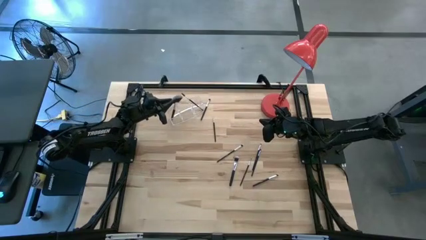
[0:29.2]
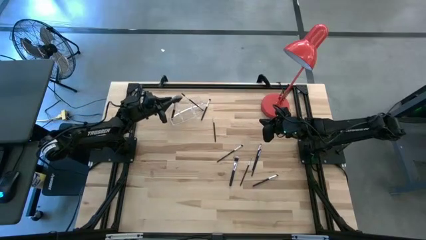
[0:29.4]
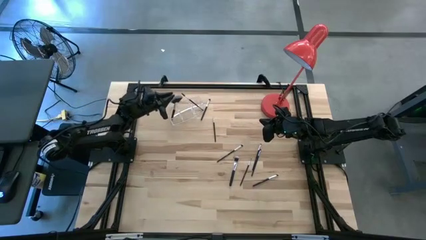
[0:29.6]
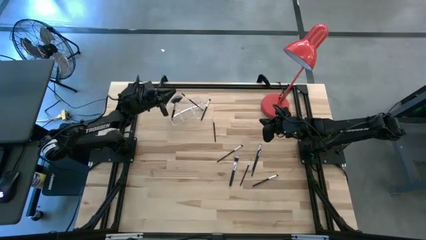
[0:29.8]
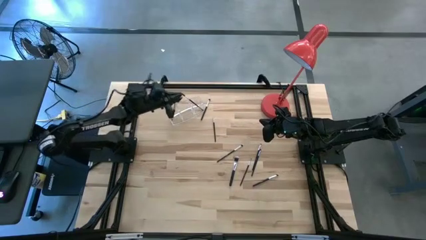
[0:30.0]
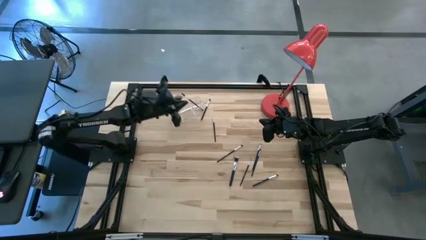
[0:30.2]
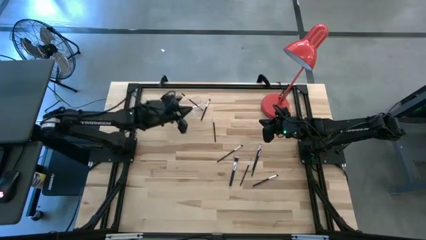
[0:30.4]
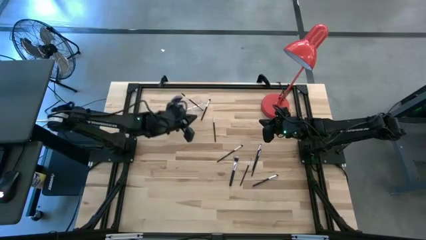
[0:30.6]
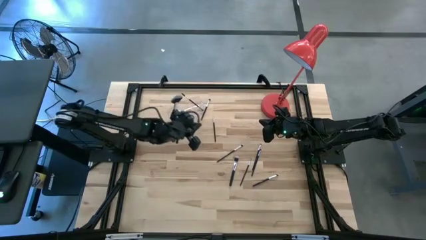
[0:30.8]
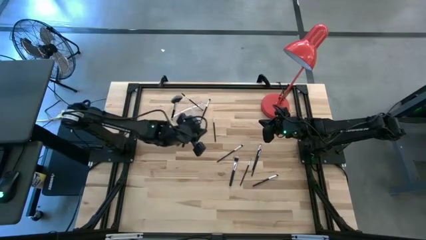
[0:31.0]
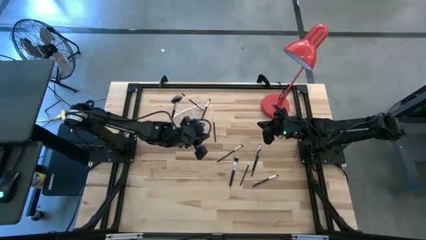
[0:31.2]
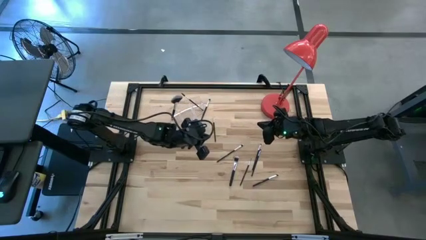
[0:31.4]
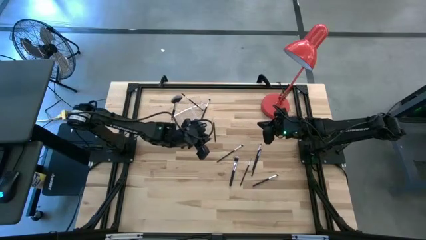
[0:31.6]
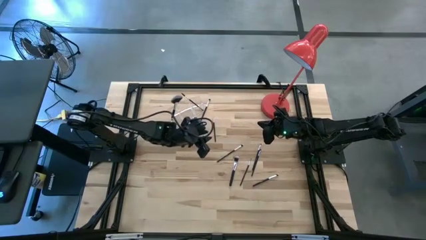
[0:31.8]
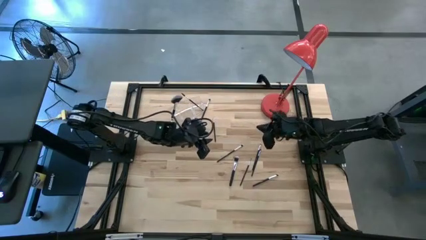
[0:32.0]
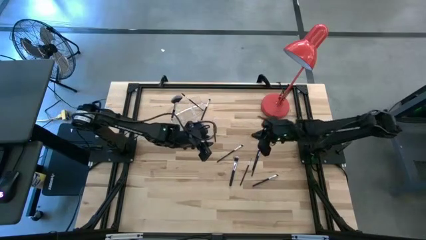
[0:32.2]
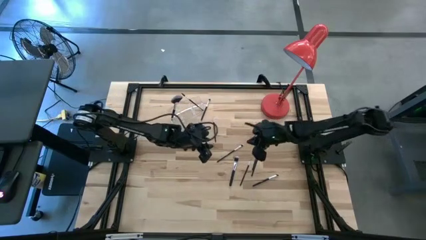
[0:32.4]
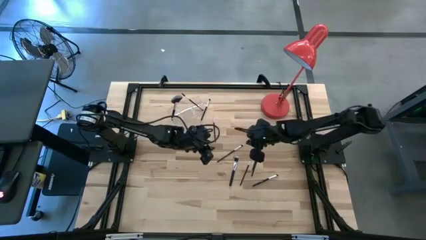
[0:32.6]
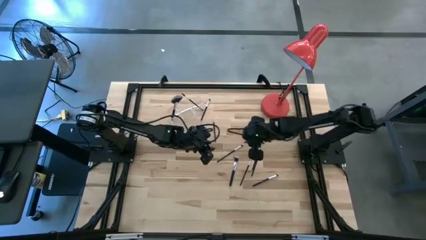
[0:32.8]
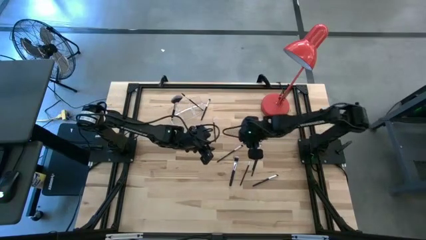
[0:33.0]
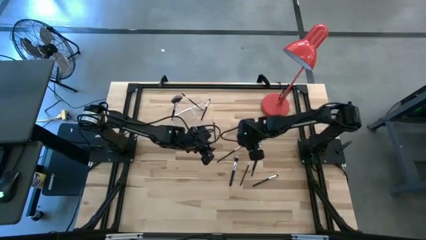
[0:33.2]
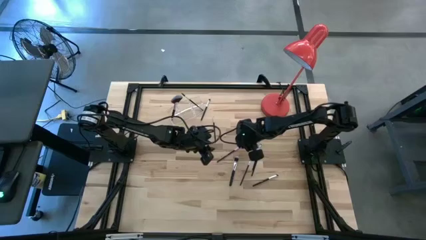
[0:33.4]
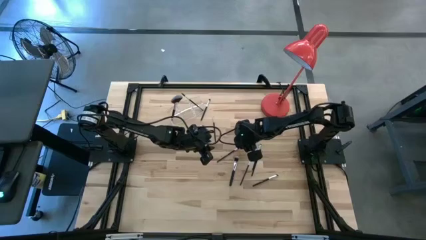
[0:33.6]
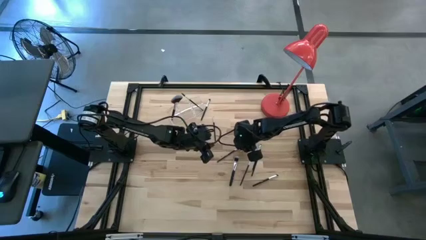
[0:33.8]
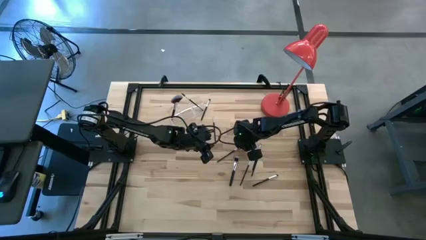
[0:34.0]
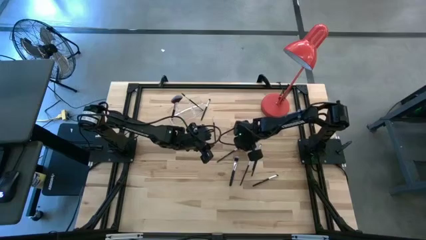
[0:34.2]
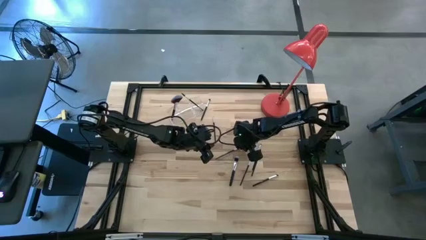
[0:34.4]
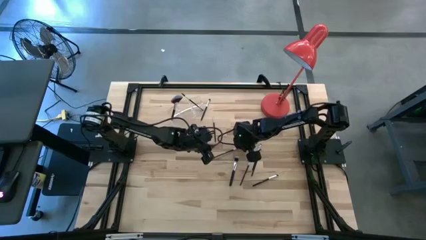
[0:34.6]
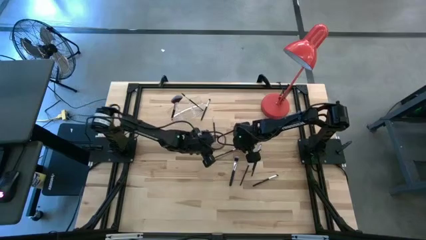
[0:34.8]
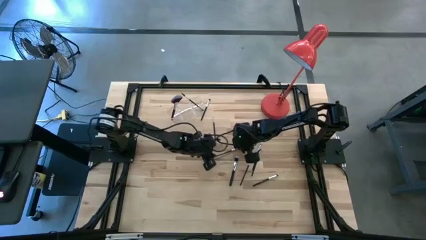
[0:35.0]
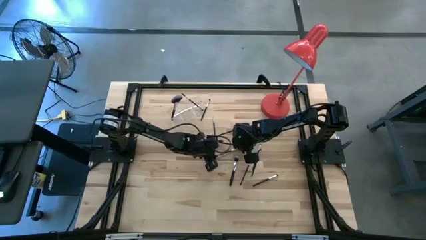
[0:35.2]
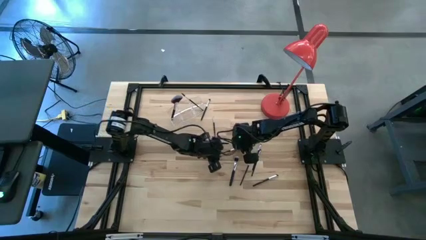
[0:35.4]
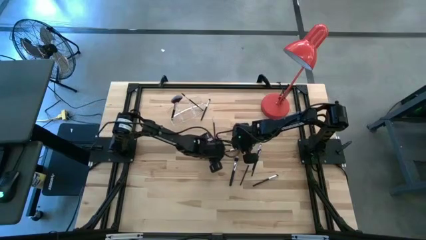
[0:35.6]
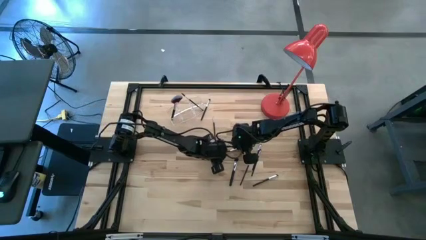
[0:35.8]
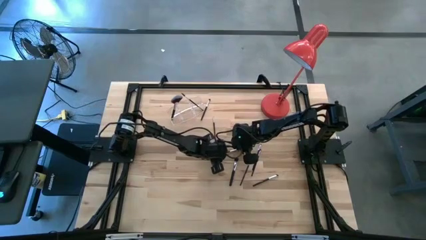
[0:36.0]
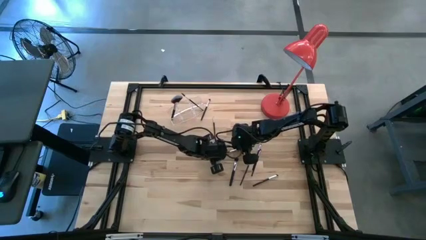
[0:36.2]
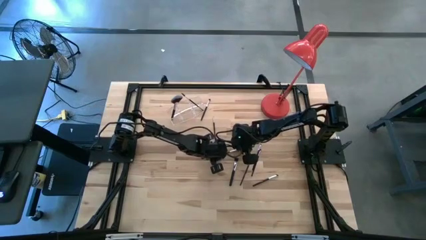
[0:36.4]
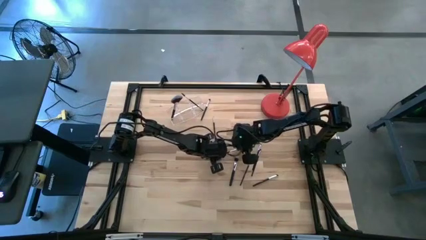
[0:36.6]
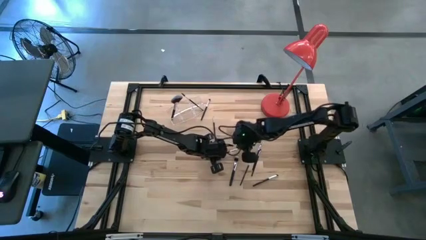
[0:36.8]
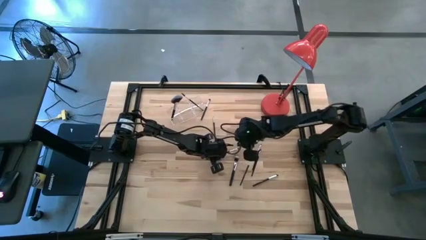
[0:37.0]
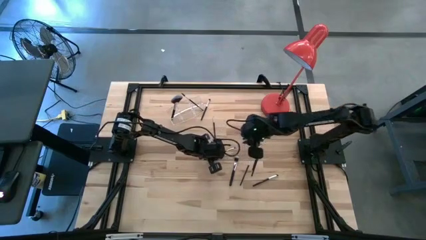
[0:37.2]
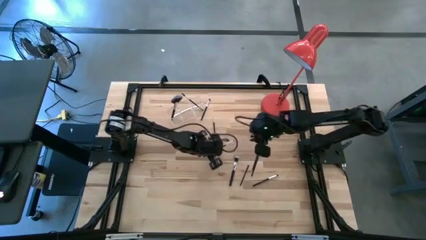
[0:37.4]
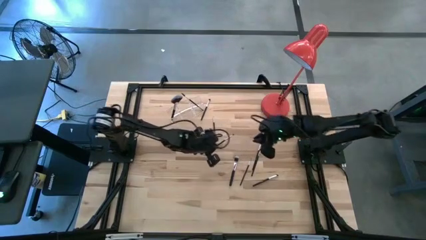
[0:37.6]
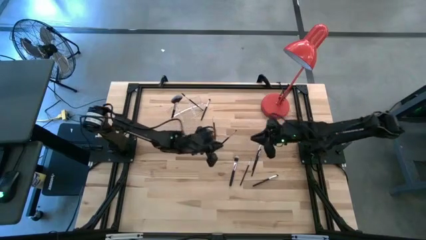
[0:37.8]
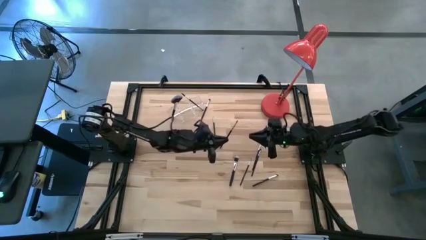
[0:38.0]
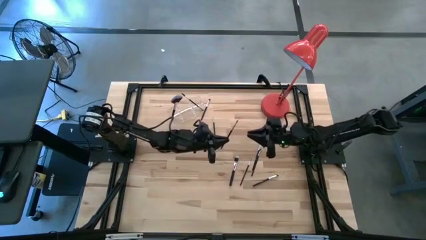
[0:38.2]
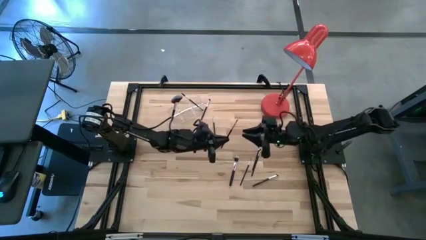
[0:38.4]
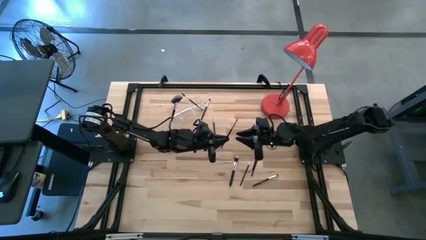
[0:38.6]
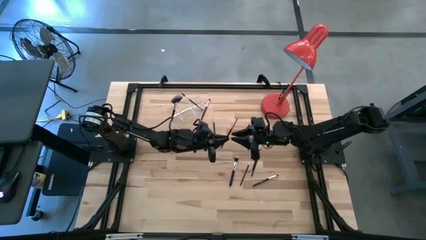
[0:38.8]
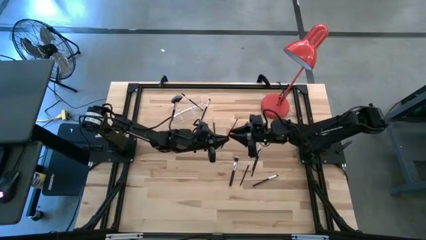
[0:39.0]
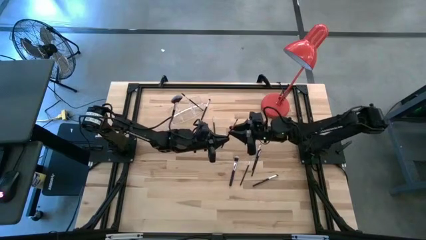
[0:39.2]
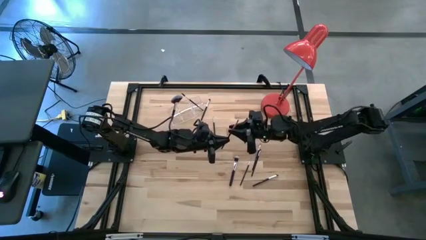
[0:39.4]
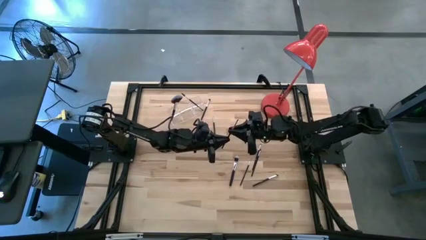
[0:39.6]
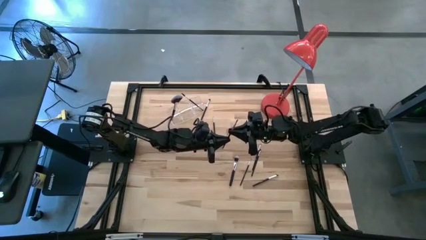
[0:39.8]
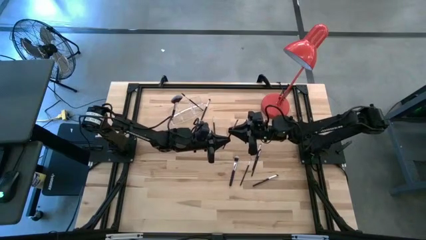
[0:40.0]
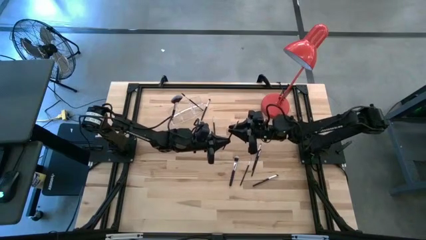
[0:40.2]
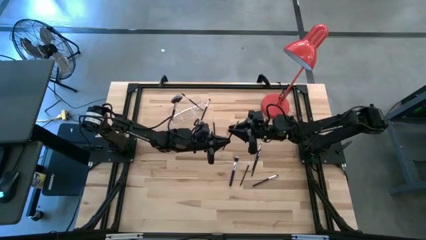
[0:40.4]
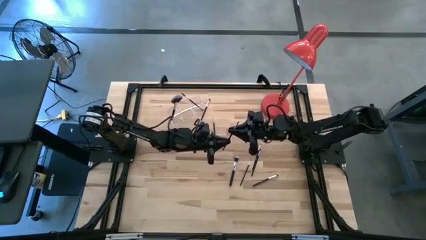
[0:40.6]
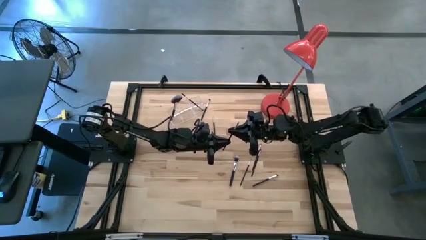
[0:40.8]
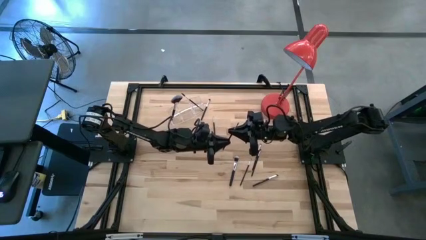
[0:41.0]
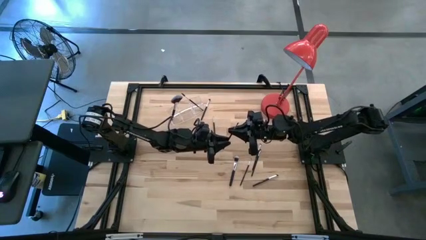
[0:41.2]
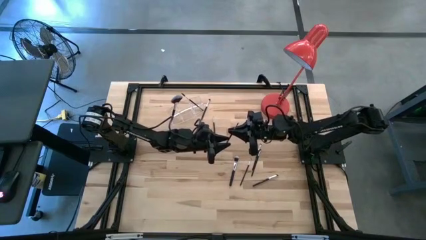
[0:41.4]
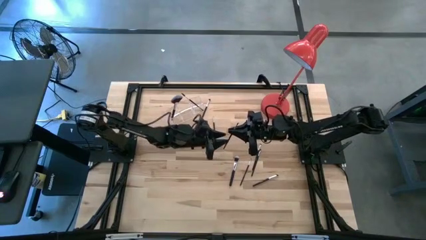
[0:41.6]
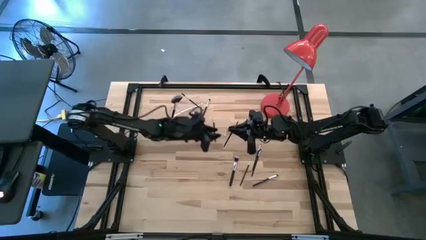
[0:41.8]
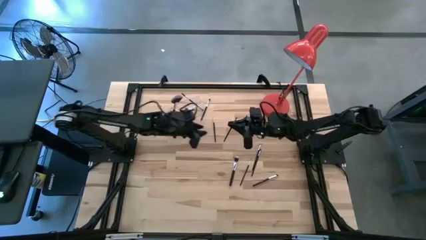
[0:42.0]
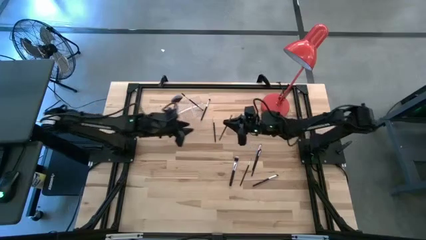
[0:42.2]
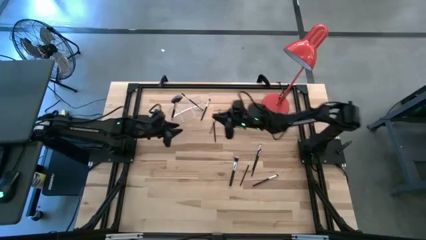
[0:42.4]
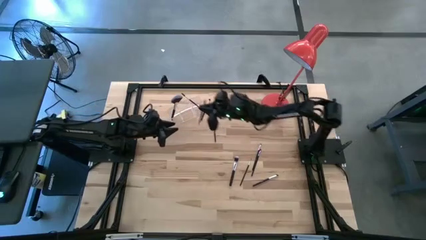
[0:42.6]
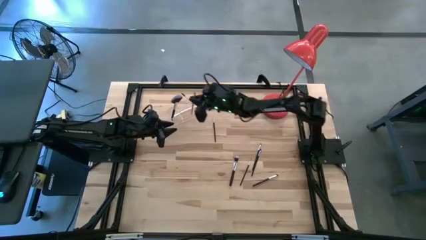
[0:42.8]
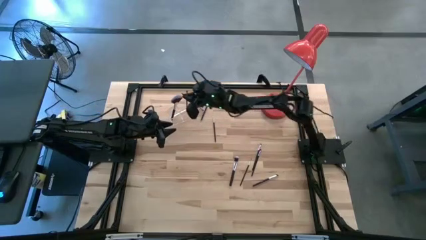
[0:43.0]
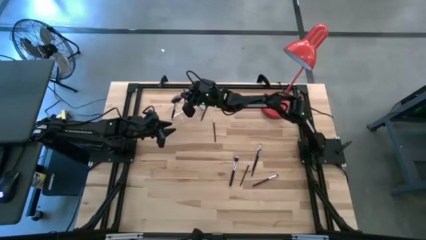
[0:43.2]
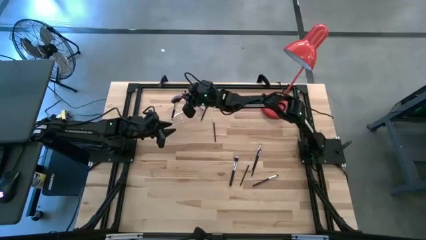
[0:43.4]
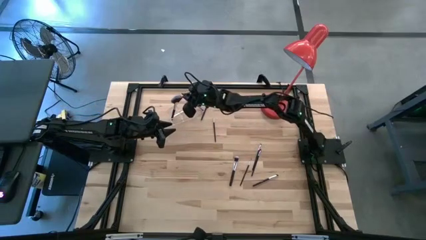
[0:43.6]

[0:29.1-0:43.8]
Task: Put items in baskets/containers
Put the eyeshadow brush into the transparent organizer

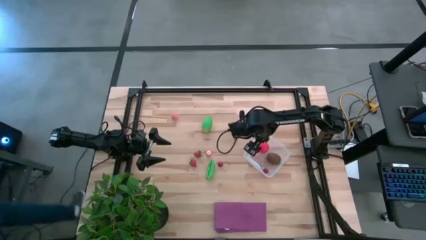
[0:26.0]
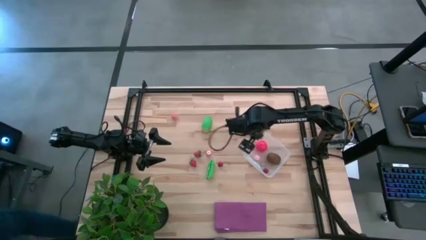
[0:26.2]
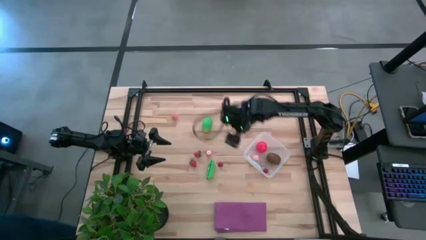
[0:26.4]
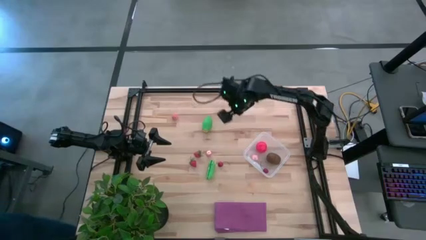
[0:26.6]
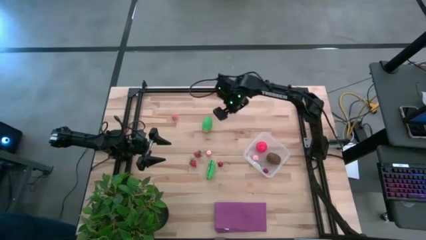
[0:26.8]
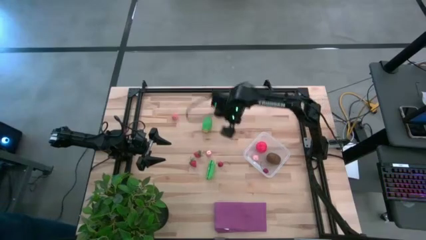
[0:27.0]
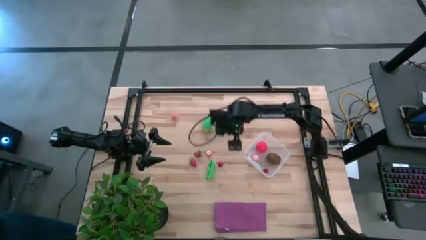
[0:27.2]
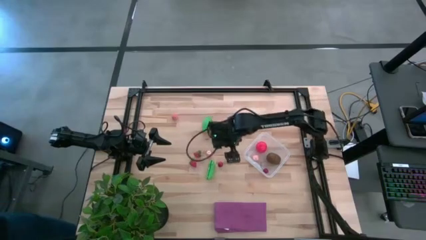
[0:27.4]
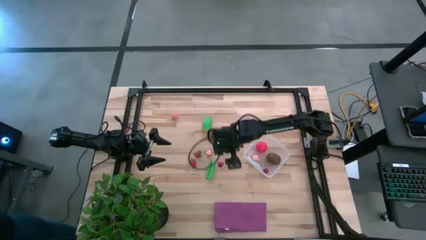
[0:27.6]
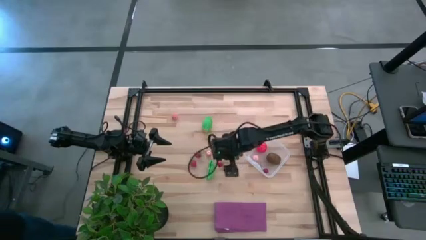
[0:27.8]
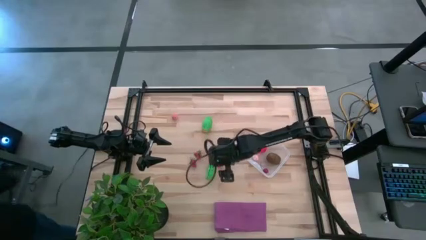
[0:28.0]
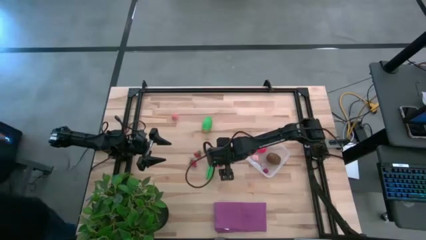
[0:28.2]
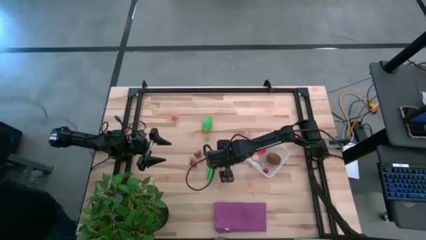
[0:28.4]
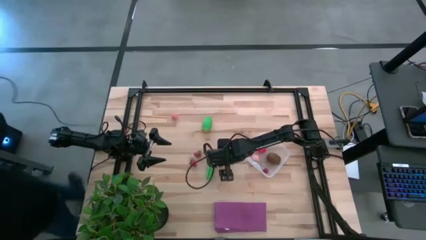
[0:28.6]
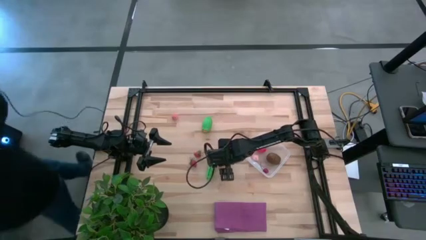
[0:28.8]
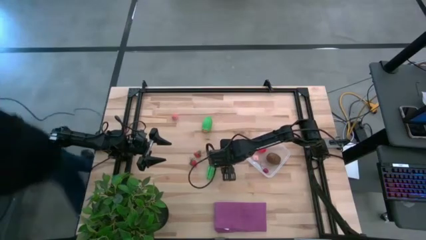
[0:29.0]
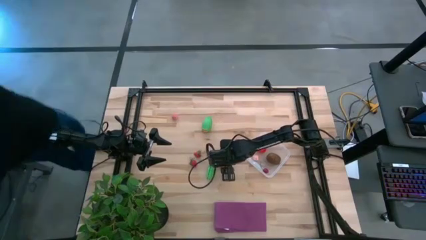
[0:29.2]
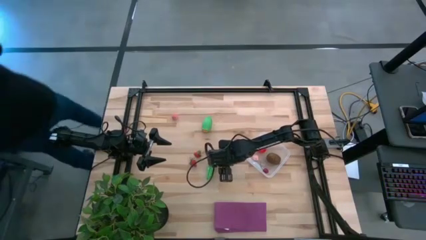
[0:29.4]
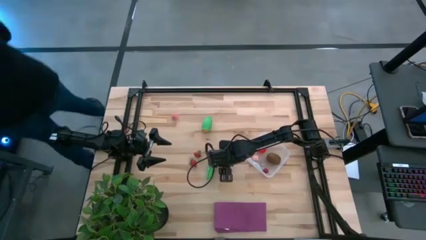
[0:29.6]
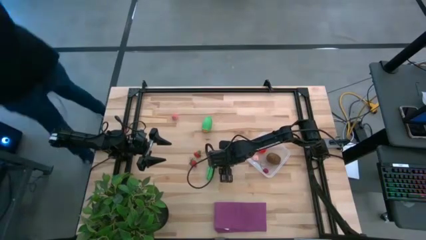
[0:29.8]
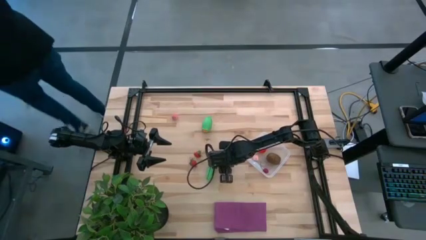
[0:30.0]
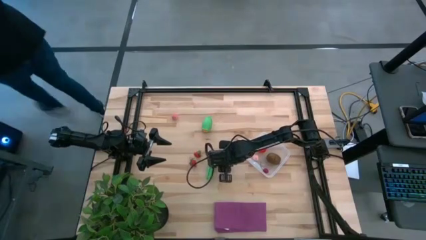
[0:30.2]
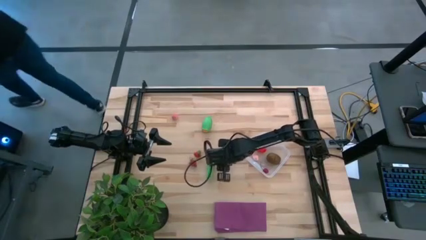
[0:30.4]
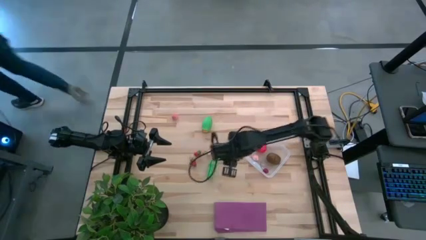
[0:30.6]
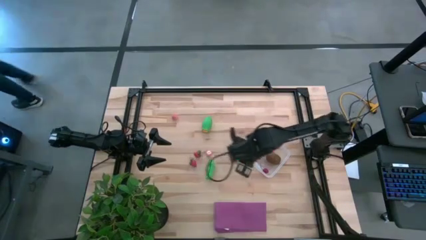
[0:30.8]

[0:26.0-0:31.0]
Task: Pick and placing Produce into tupperware
Put the red cherry into the transparent bin
